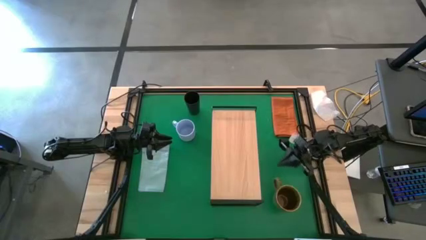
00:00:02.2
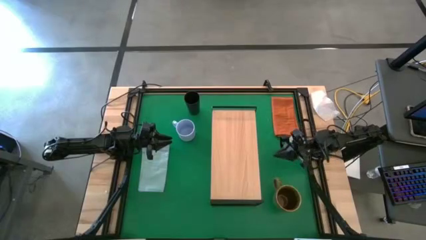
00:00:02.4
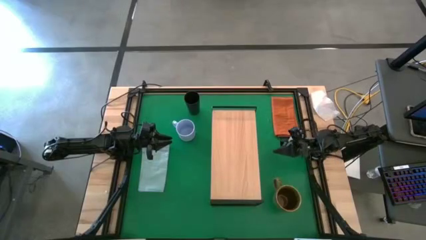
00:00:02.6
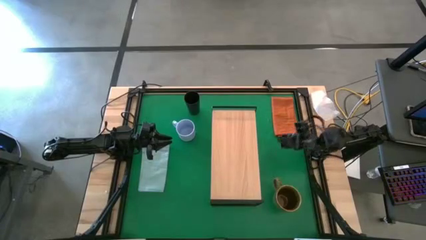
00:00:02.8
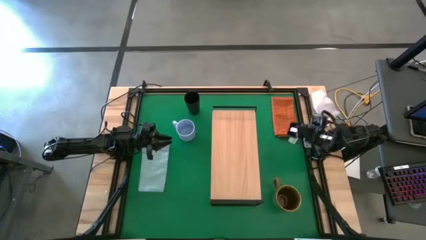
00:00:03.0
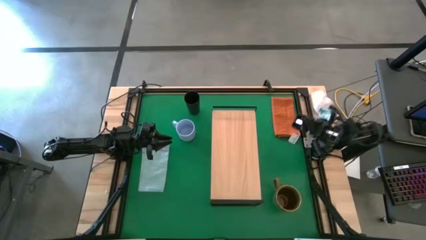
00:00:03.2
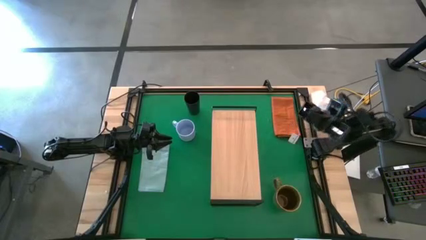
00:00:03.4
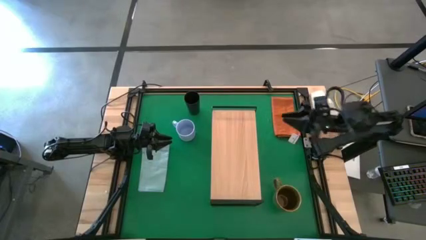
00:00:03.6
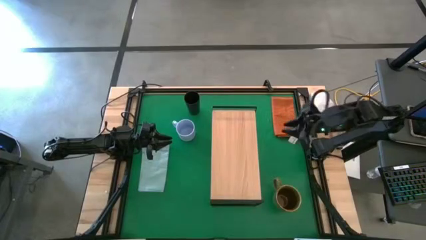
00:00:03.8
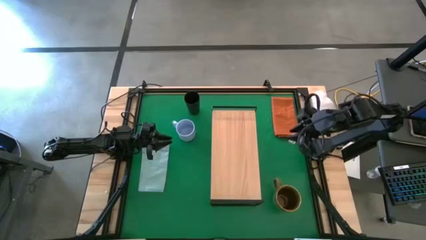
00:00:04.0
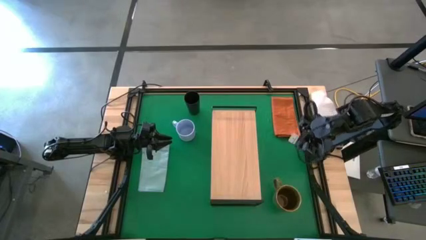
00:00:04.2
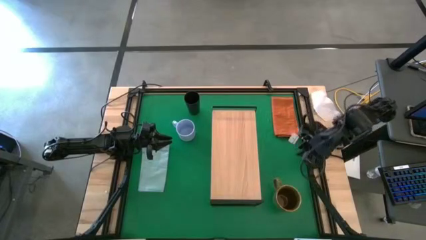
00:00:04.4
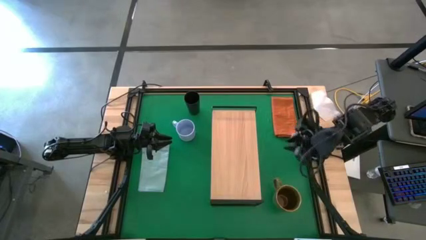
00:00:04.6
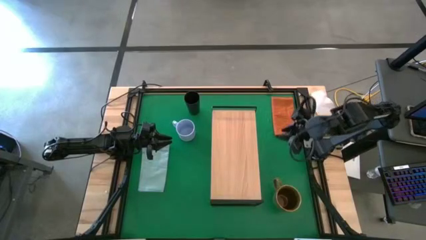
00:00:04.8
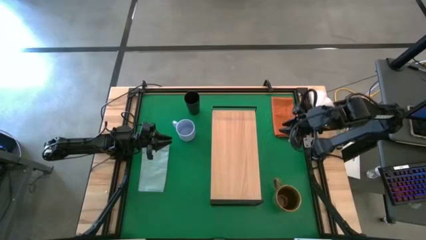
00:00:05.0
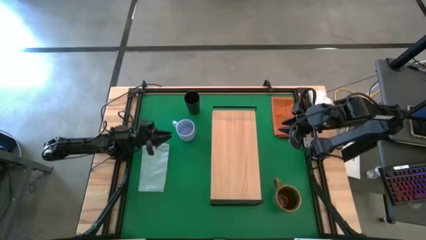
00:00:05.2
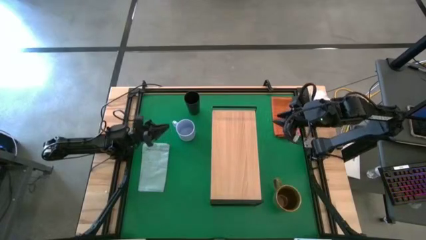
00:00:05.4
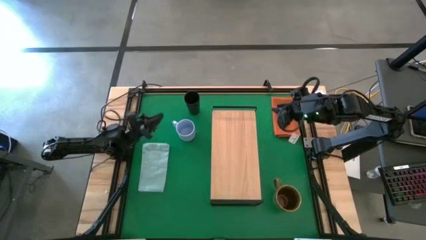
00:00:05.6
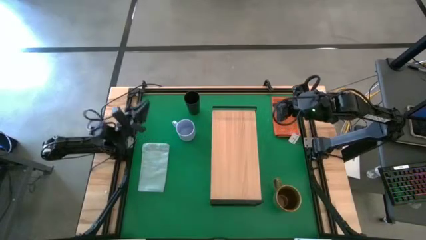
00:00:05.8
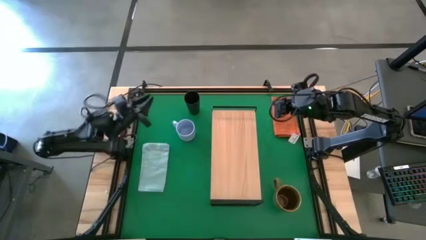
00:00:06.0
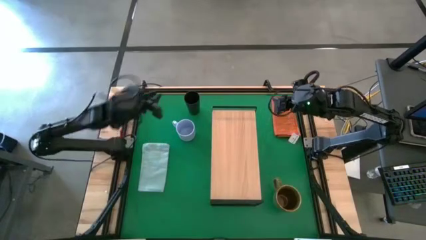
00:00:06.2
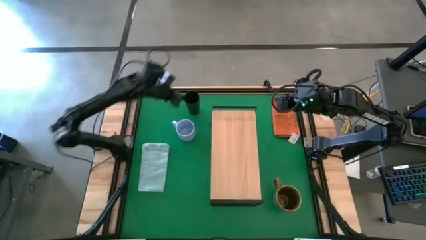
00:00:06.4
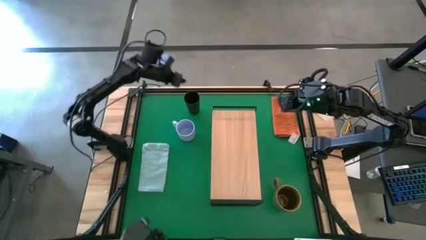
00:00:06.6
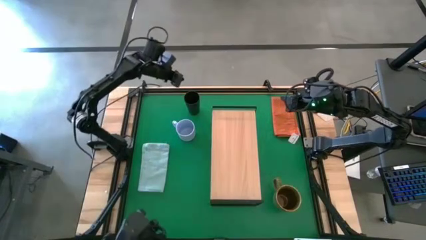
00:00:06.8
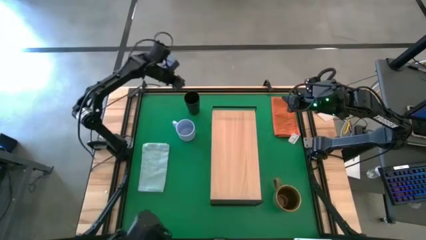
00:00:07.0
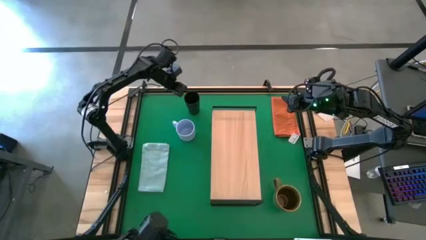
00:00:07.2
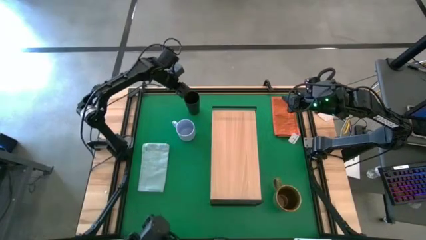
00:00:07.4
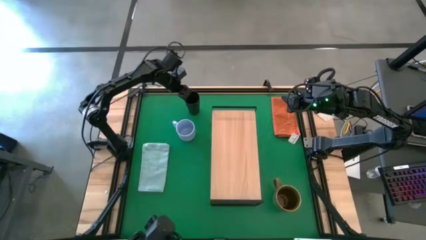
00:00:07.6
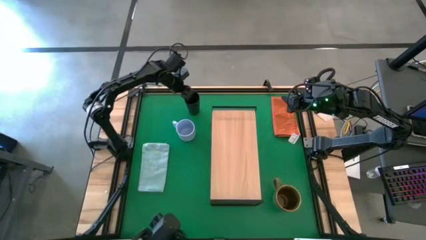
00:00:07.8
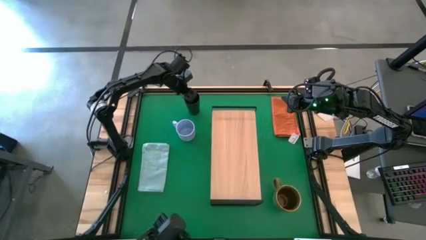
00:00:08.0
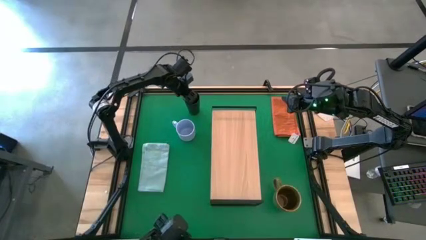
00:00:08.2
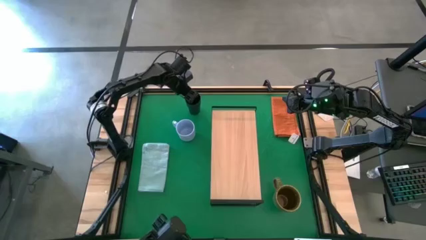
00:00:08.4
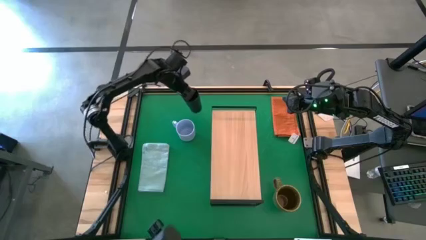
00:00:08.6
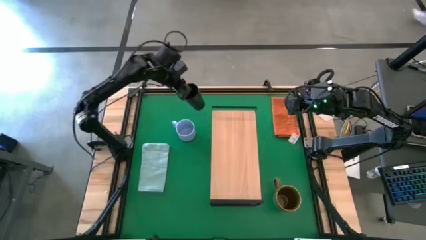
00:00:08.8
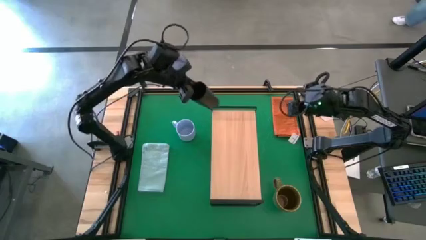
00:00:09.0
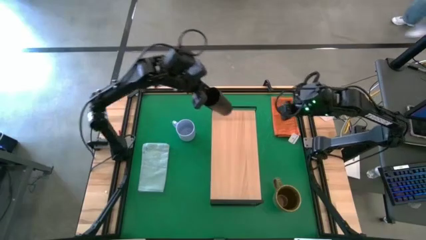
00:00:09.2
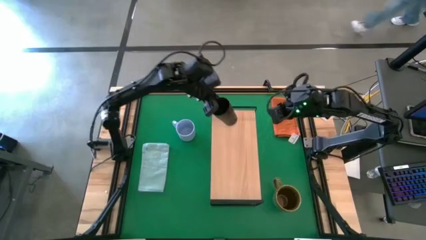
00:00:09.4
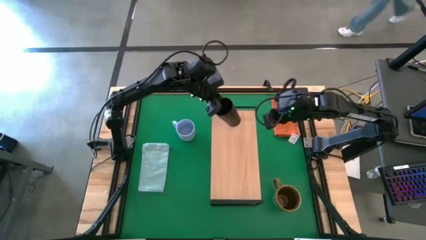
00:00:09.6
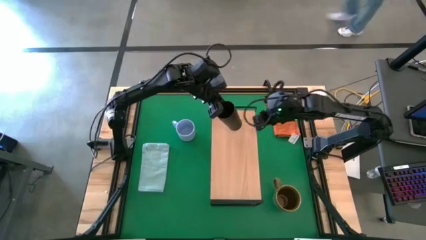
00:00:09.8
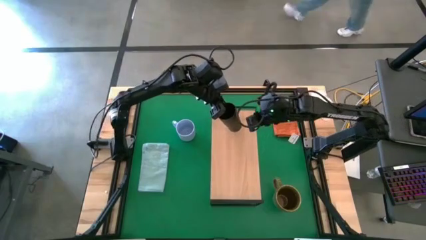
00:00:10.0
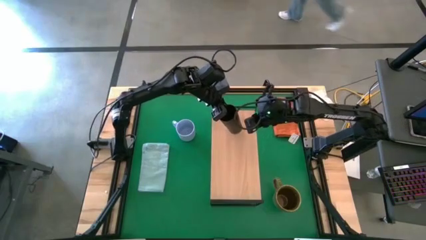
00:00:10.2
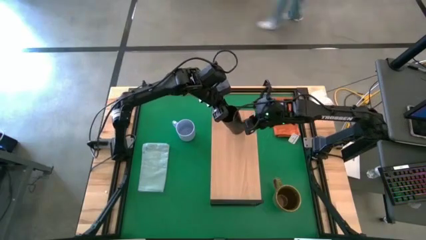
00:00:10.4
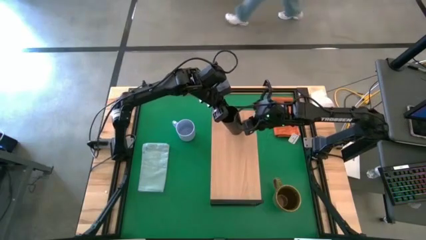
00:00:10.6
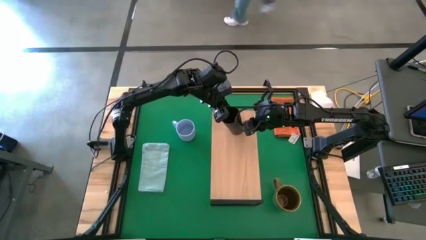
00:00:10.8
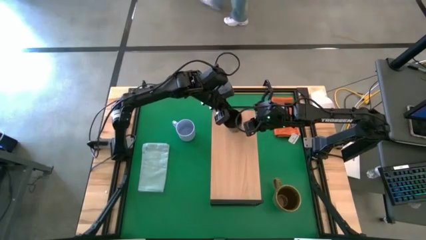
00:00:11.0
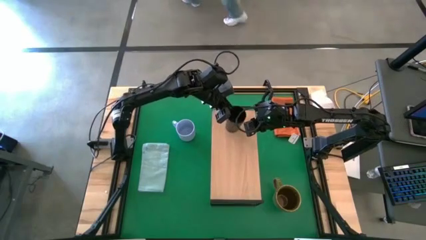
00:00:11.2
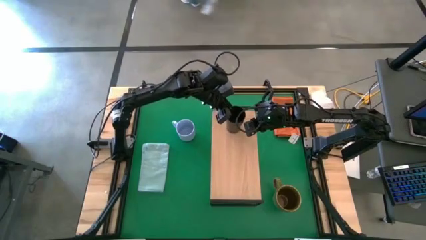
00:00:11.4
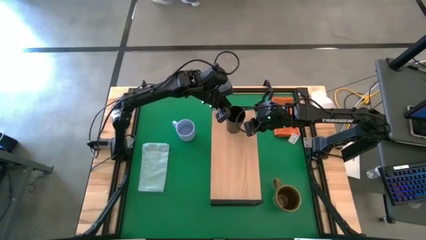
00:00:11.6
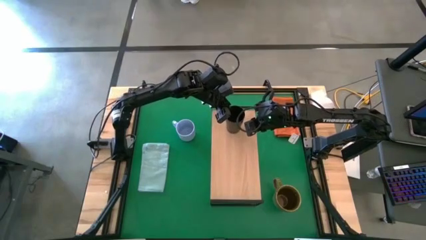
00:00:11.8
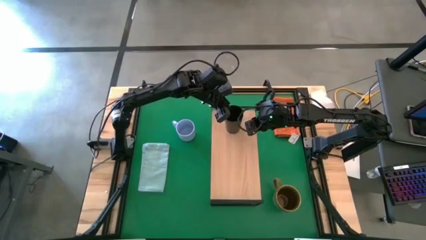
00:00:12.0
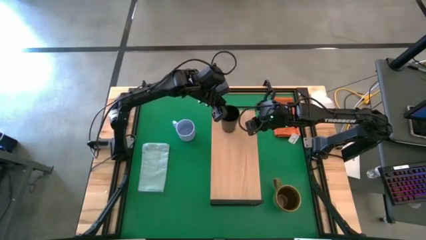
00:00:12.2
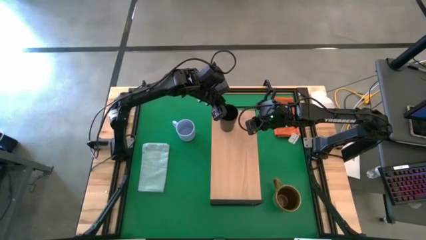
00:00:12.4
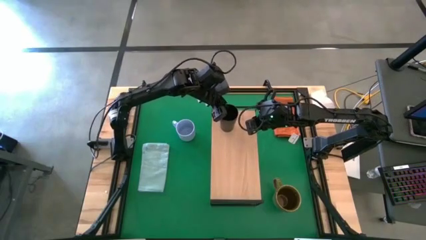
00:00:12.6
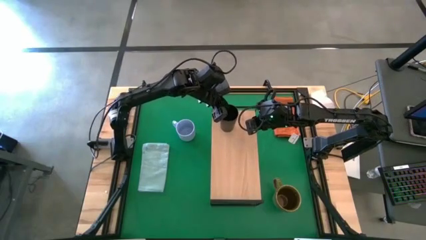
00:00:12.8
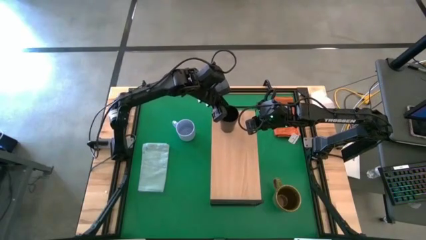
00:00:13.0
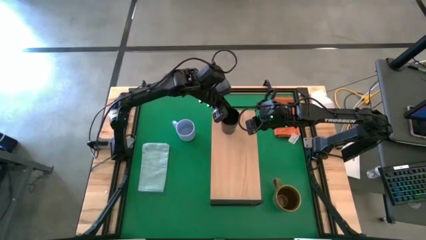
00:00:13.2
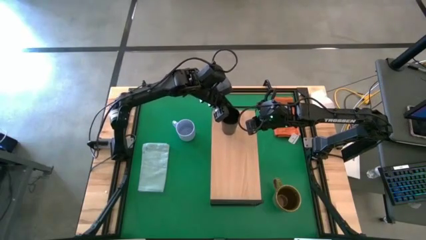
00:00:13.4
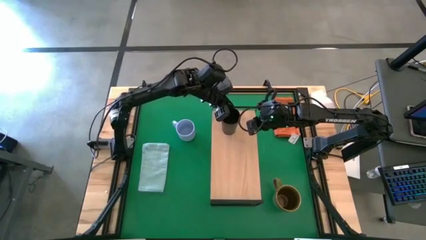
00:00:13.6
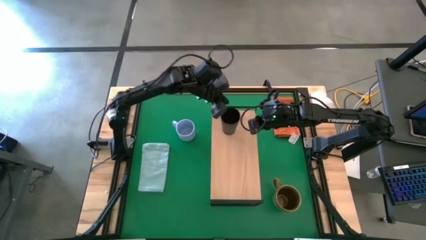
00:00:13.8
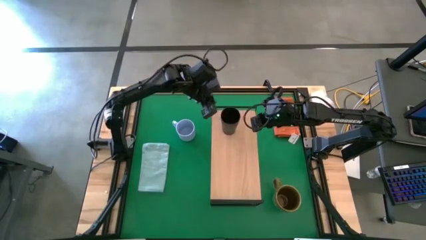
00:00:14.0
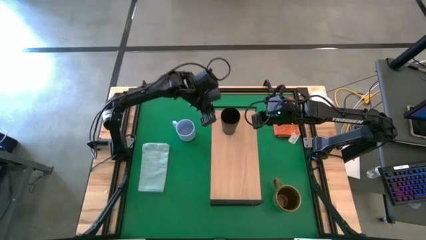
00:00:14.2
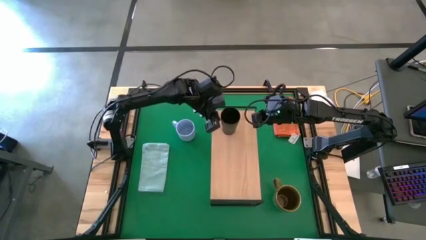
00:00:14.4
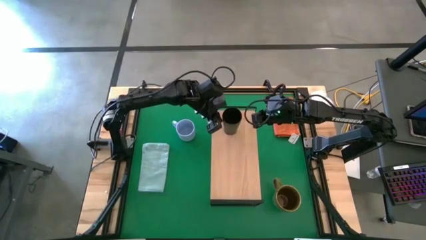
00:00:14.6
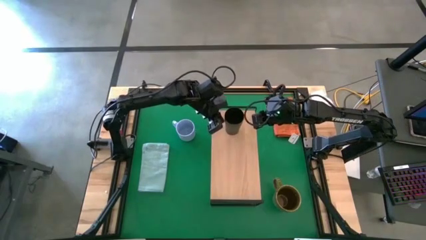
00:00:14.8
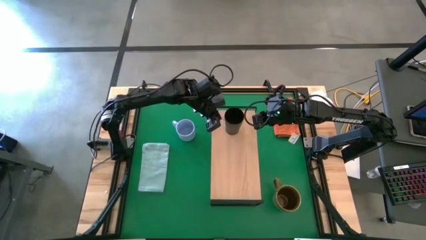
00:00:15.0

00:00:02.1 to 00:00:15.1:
Task: Stack small to large cups/mugs on shelf
Put the black cup on the shelf
